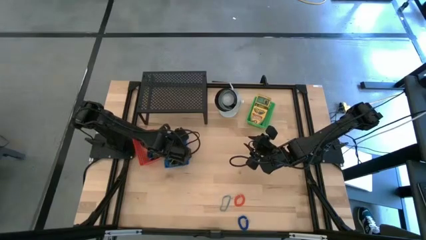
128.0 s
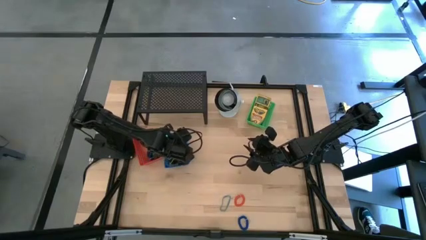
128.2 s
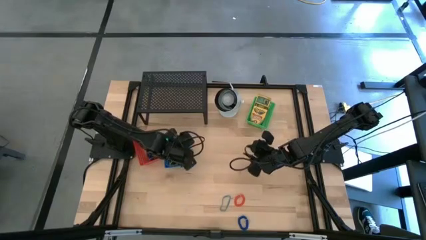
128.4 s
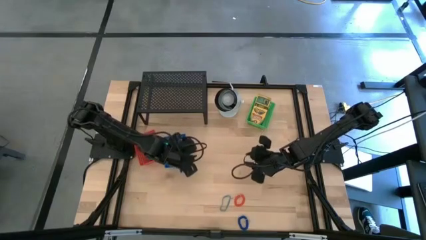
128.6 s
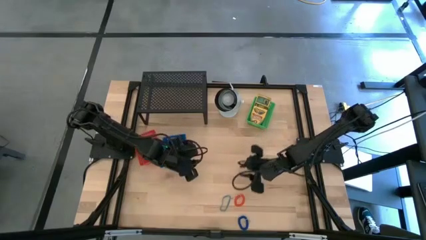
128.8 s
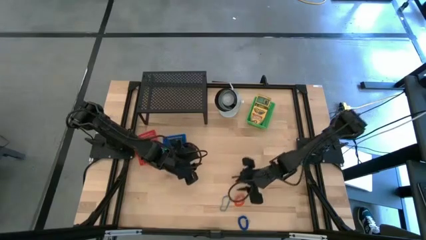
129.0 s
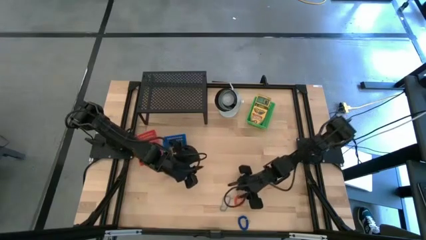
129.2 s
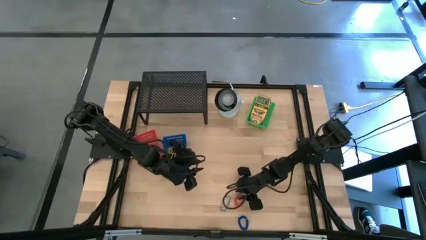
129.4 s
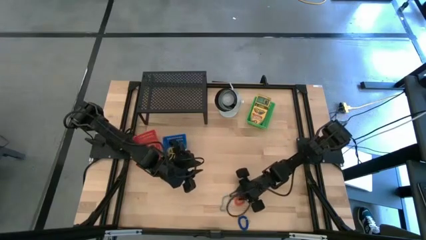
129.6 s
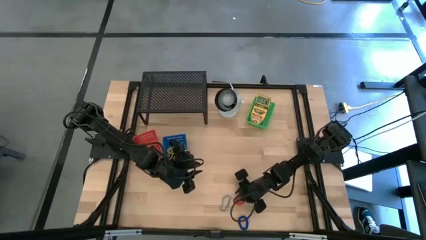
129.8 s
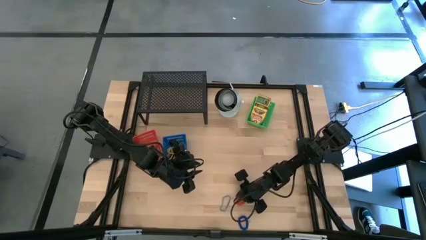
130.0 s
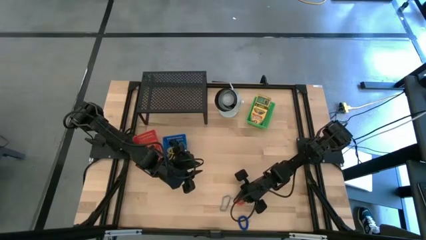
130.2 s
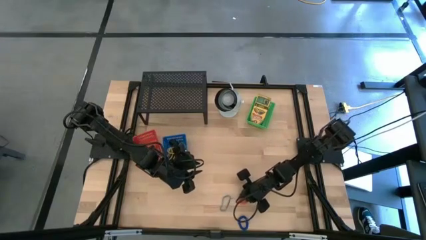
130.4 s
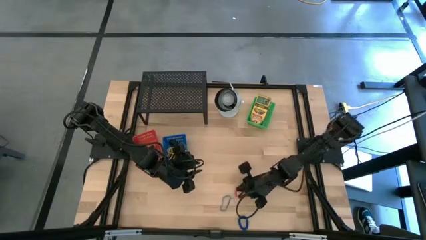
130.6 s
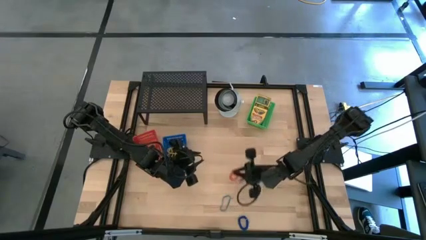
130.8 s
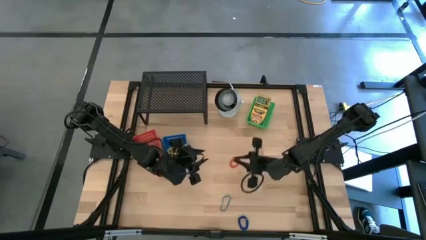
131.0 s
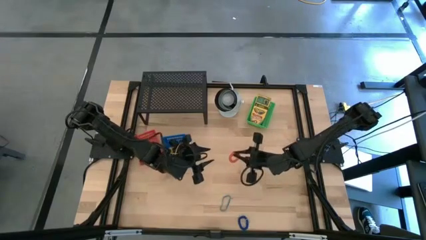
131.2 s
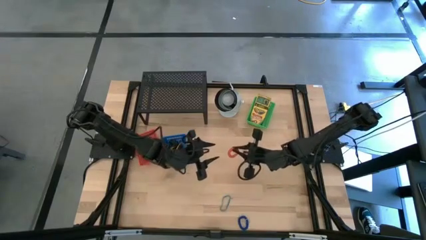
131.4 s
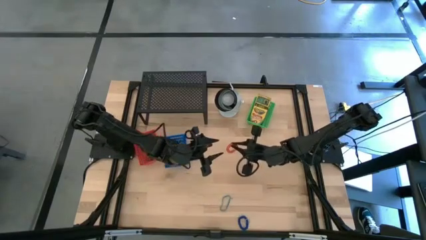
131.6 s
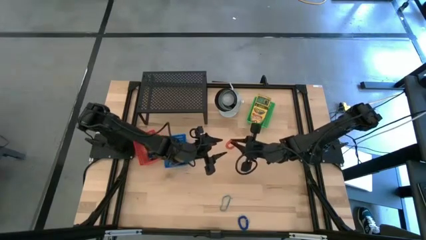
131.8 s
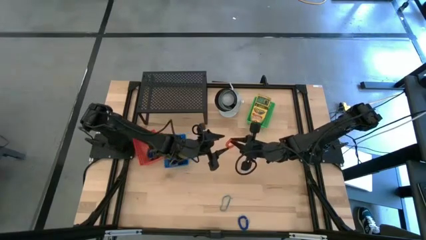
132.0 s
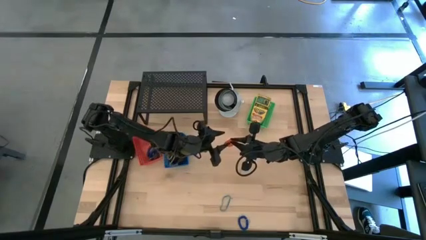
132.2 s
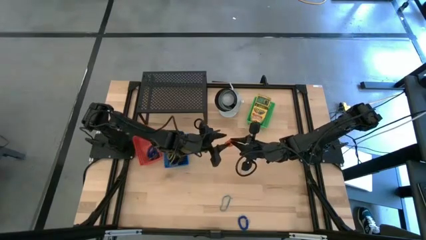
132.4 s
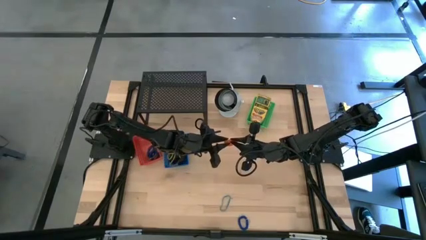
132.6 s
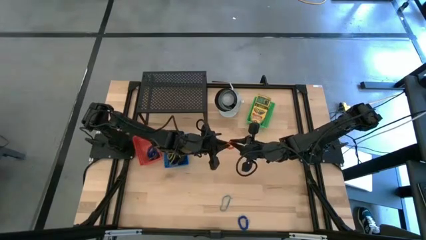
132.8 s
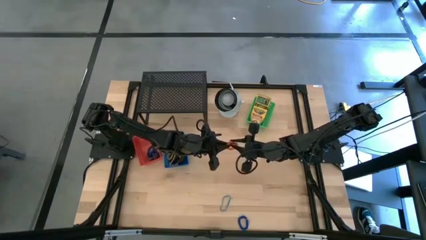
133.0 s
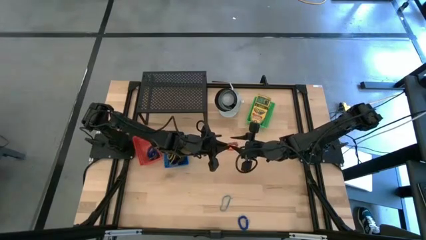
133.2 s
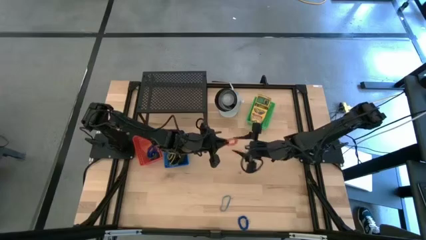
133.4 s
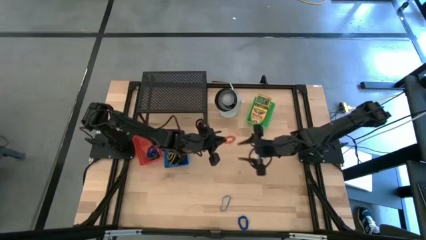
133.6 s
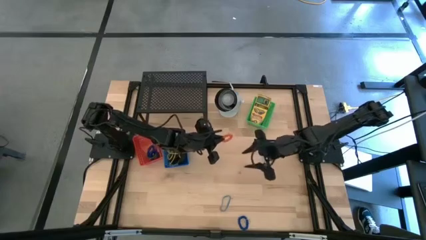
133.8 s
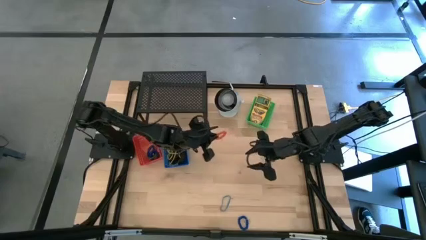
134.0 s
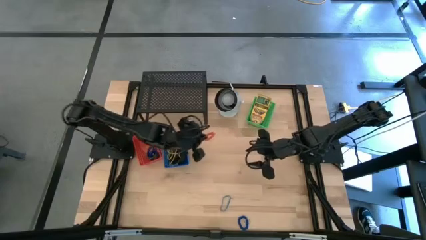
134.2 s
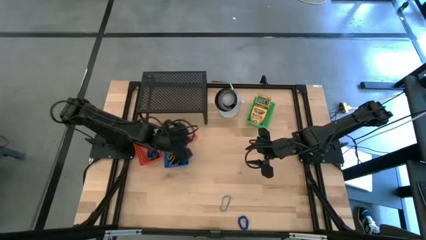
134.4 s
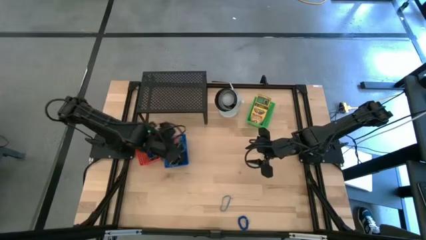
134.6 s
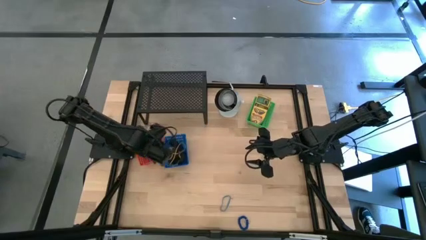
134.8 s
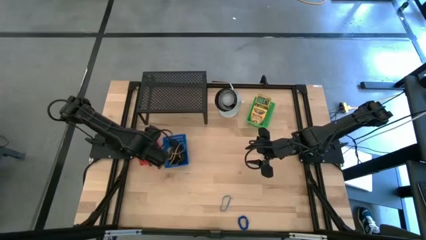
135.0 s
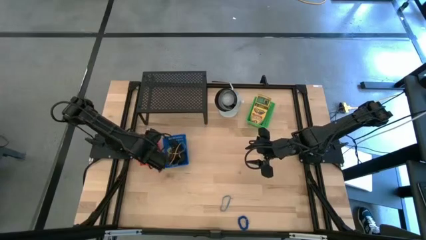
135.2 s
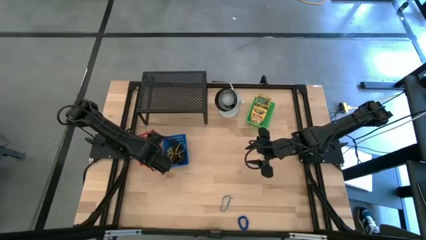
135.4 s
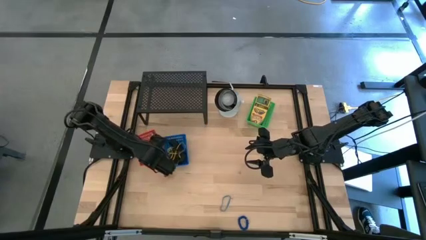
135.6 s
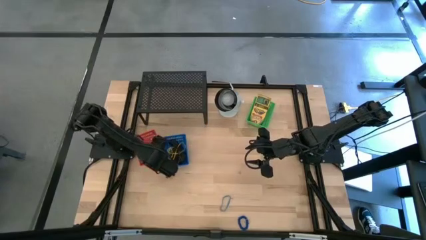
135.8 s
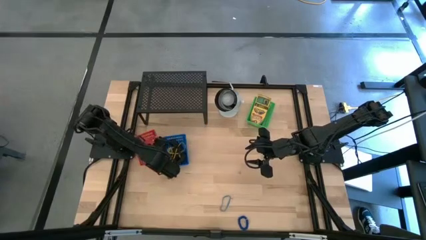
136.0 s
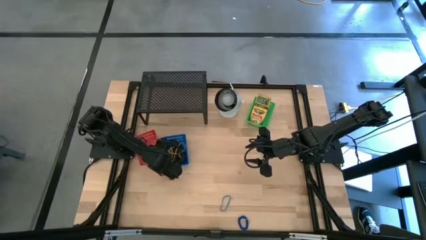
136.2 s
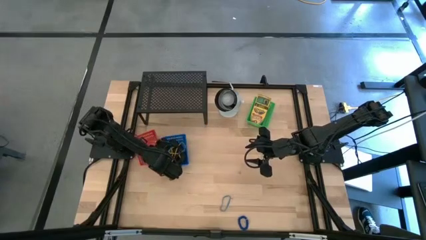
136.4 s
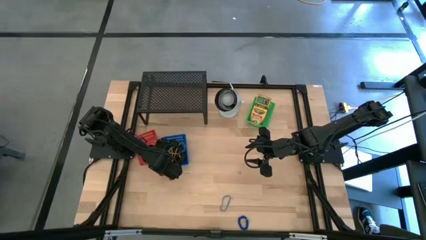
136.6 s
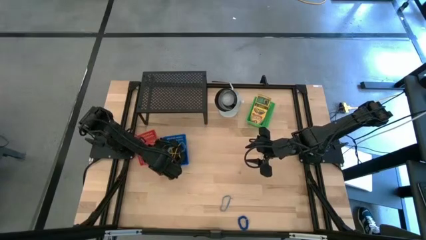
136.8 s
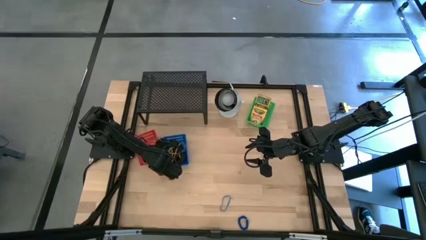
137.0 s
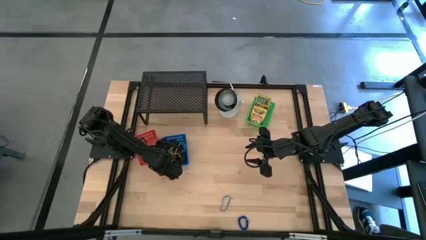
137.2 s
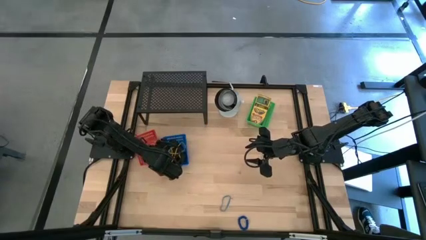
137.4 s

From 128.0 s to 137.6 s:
Task: Pick & Place Office Desk Supplies
Put the orange spring keychain into the red bin

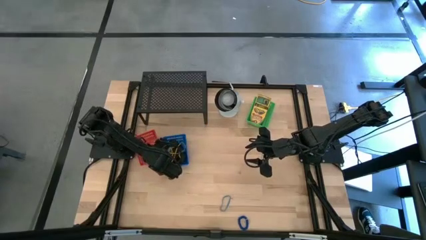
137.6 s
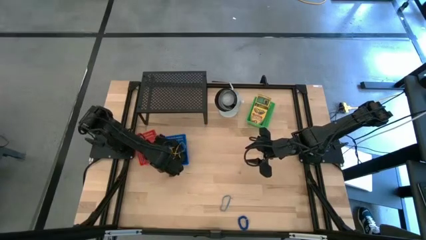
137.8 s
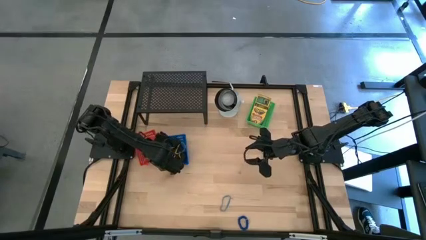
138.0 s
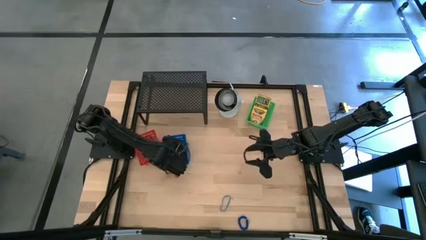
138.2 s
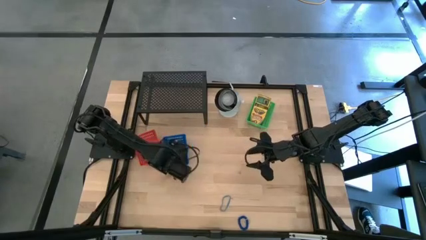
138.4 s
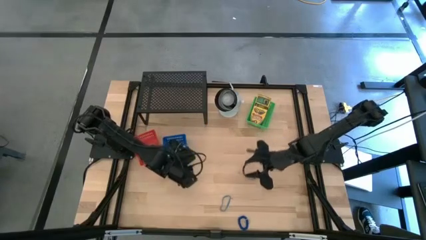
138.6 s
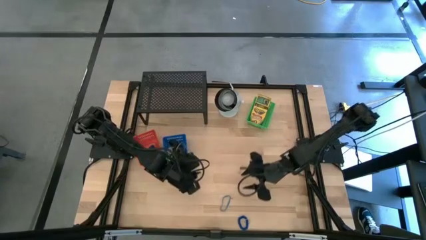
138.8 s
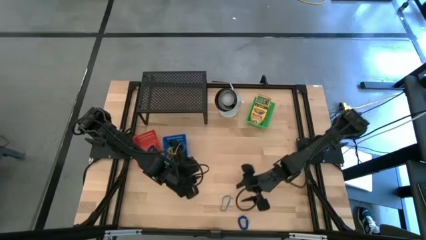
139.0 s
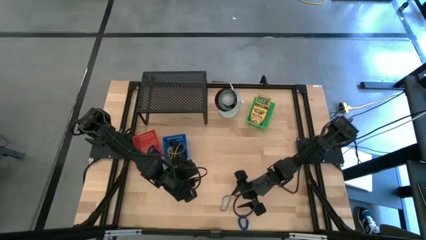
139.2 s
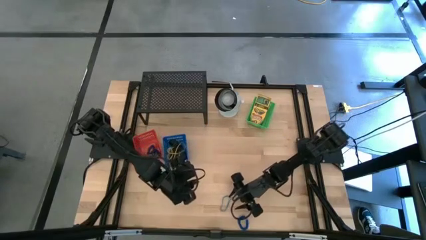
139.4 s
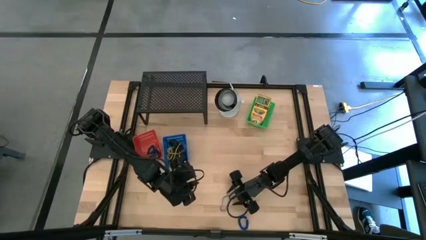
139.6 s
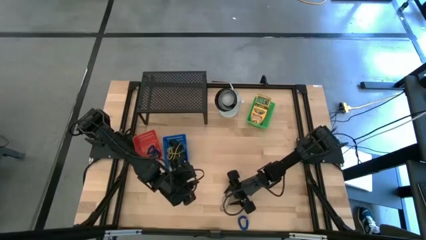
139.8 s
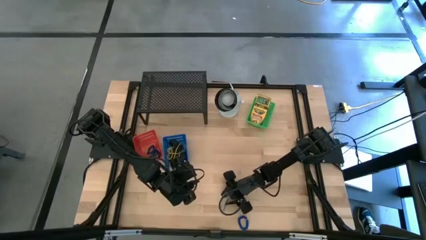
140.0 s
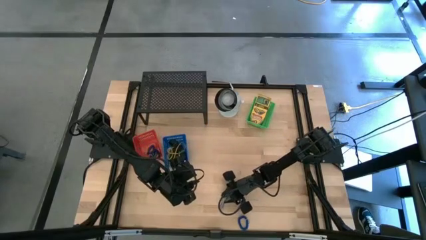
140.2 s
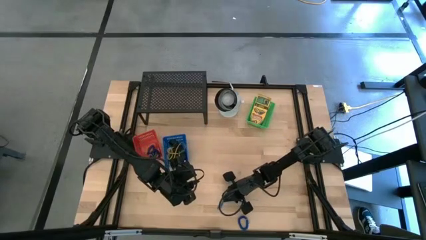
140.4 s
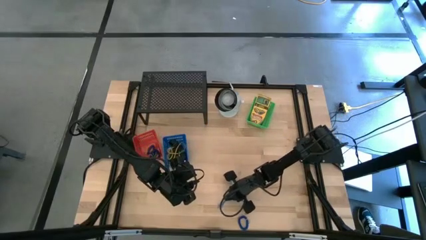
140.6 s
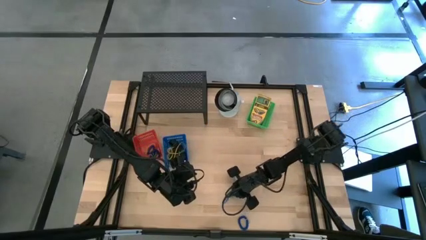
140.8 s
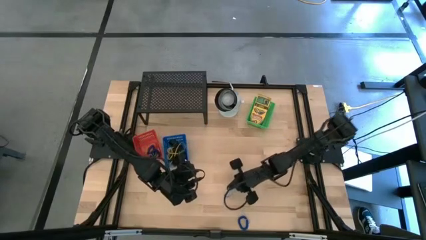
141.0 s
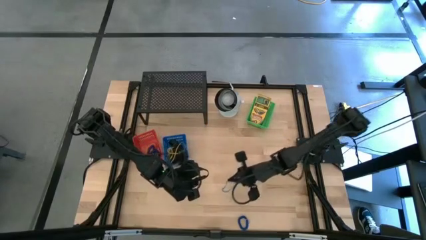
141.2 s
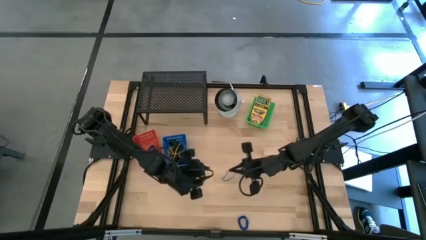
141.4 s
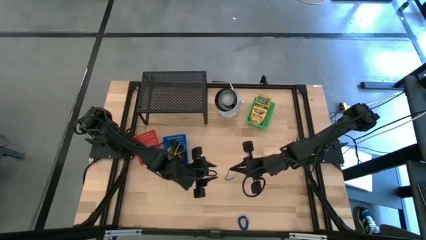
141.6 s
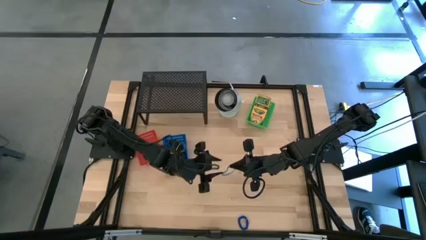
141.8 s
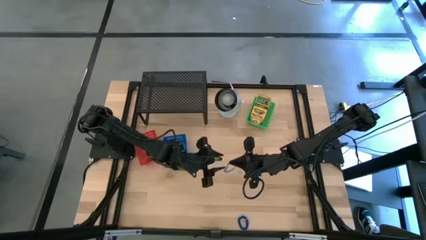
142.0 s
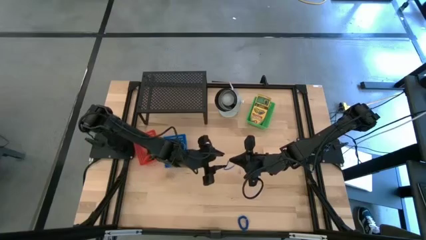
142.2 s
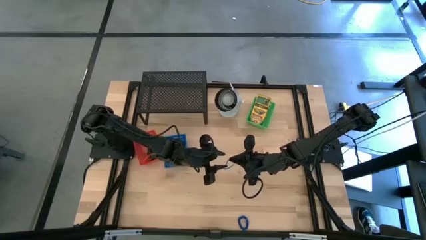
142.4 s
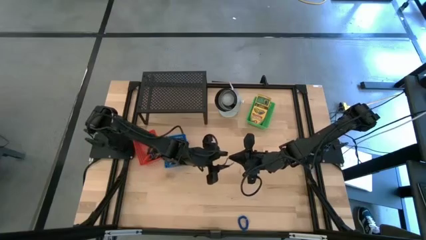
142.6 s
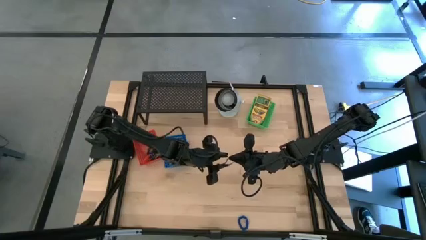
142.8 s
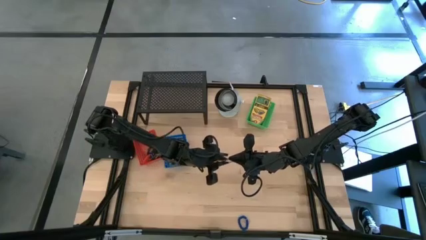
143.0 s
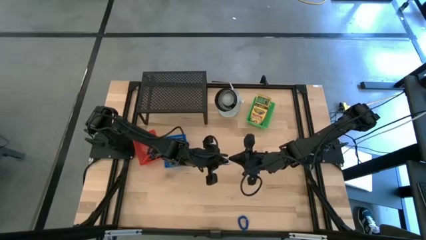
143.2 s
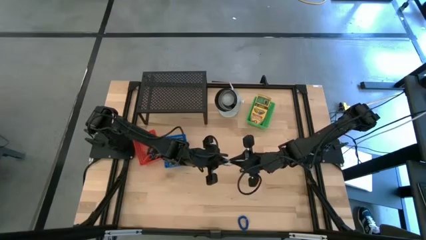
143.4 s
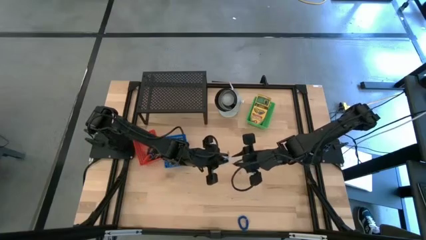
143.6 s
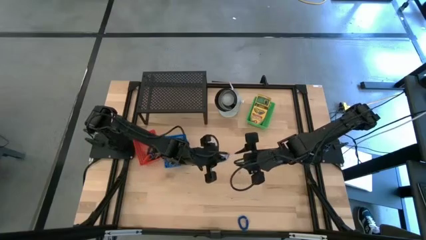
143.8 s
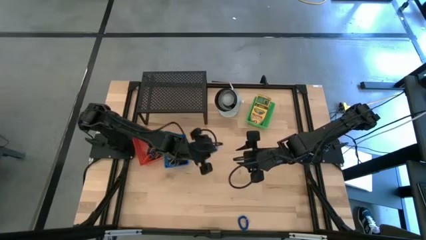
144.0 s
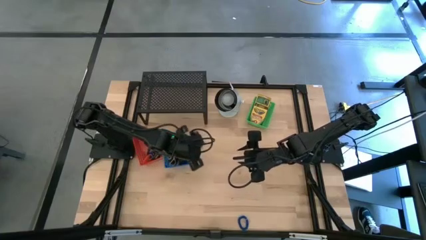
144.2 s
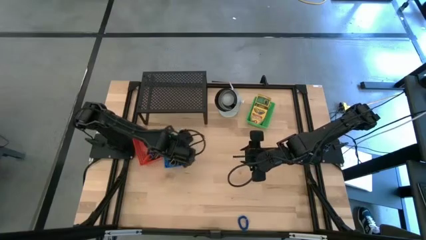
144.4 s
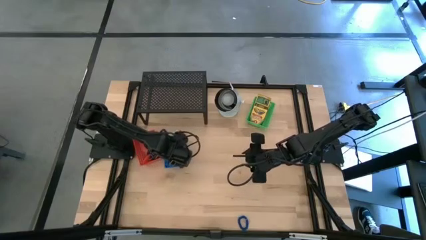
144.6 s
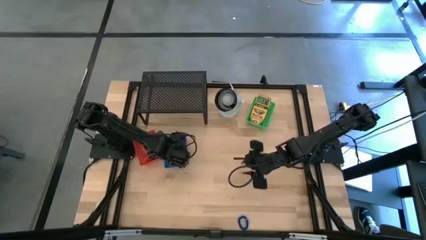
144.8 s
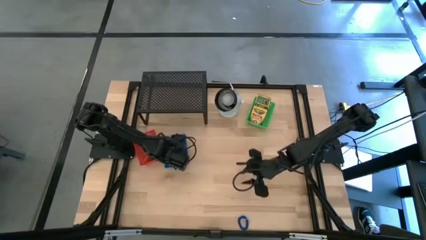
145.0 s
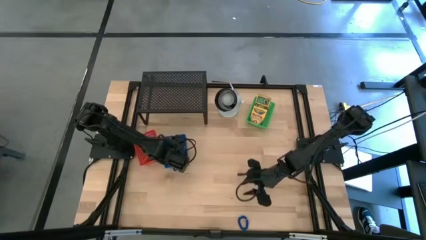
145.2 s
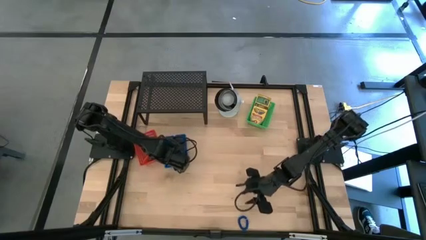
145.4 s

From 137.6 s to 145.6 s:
Put the blue rubber band into the blue bin
